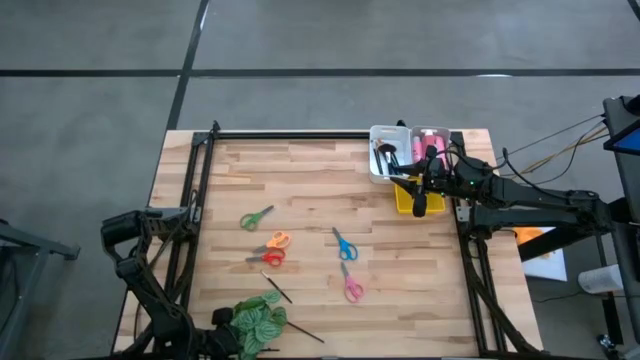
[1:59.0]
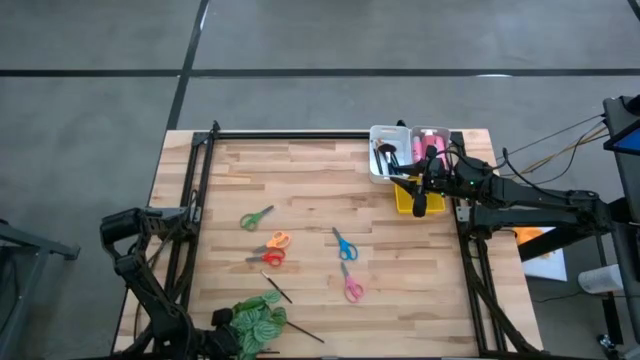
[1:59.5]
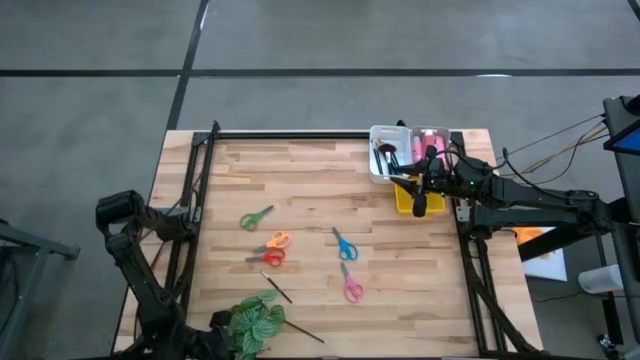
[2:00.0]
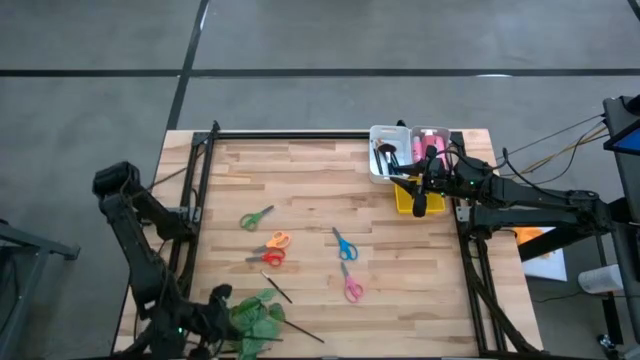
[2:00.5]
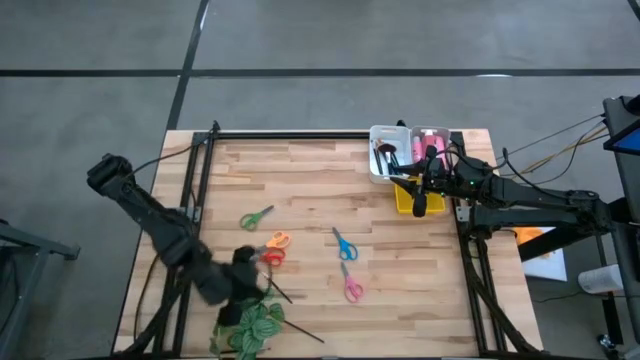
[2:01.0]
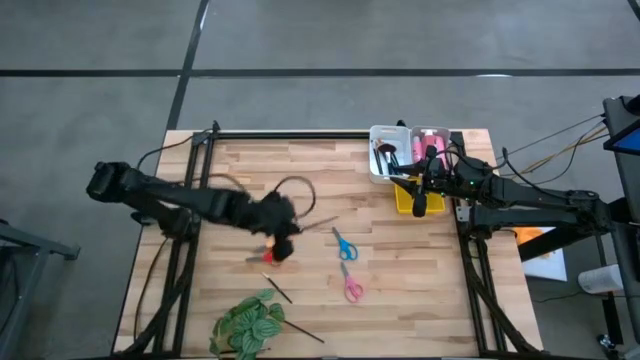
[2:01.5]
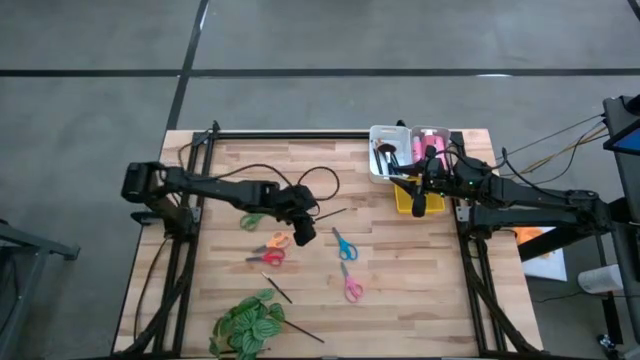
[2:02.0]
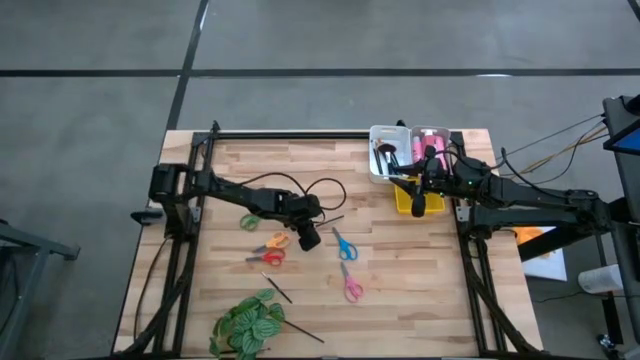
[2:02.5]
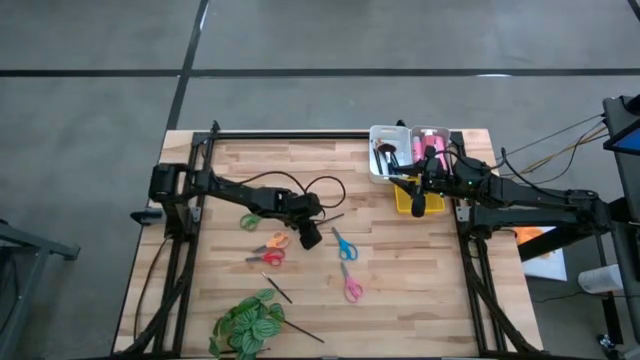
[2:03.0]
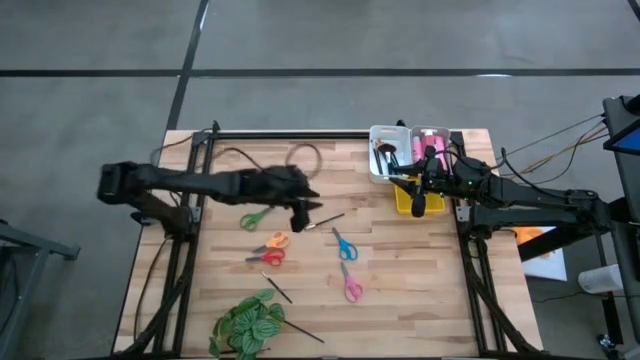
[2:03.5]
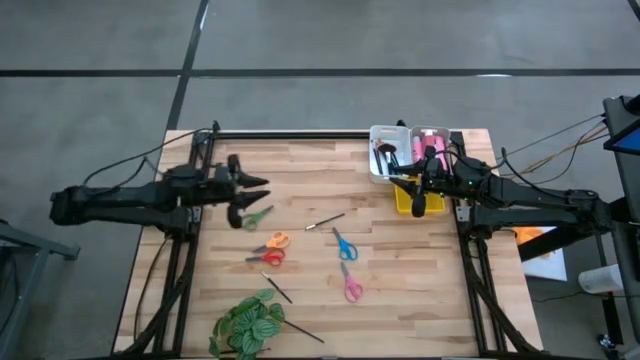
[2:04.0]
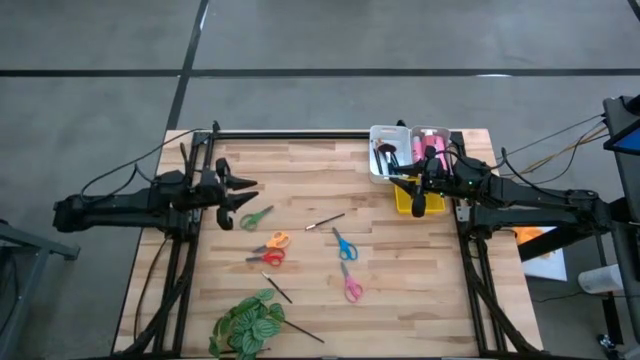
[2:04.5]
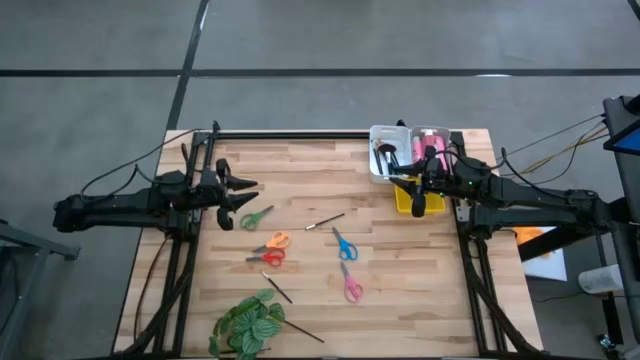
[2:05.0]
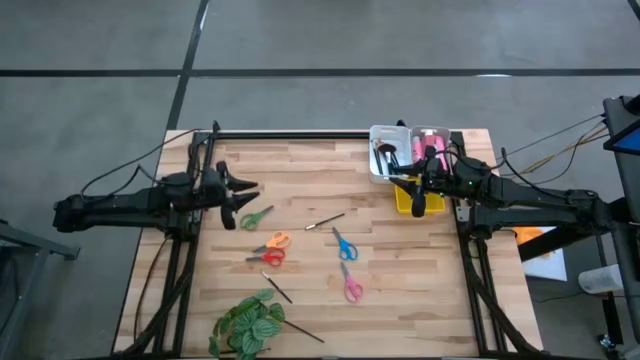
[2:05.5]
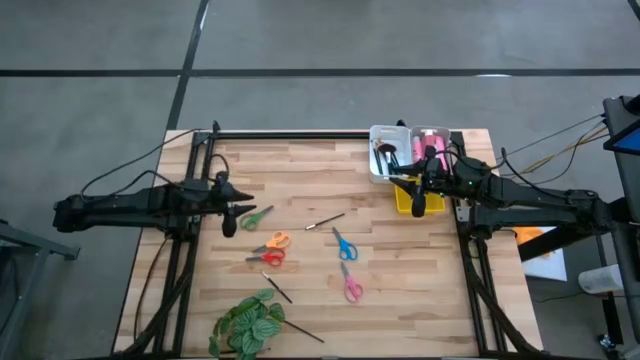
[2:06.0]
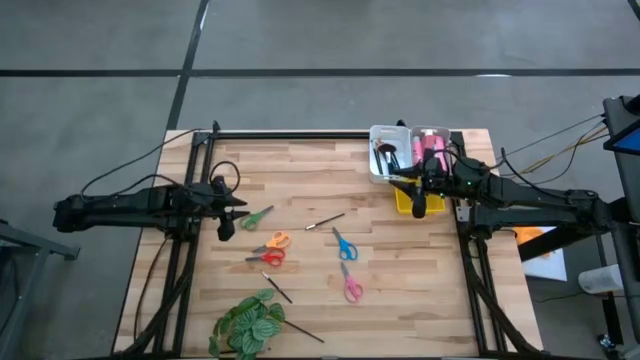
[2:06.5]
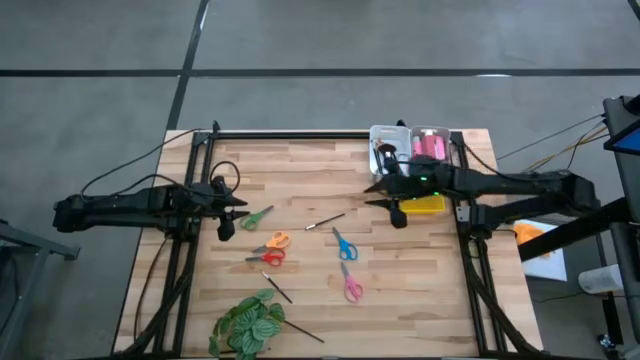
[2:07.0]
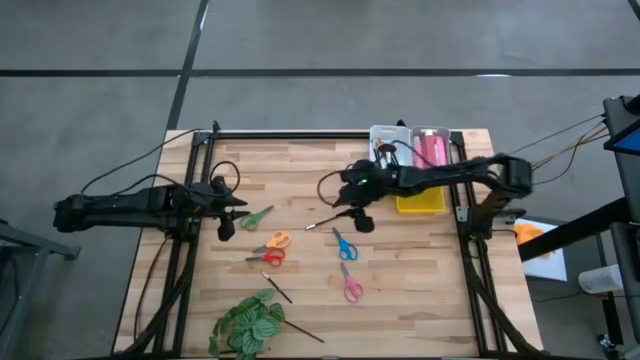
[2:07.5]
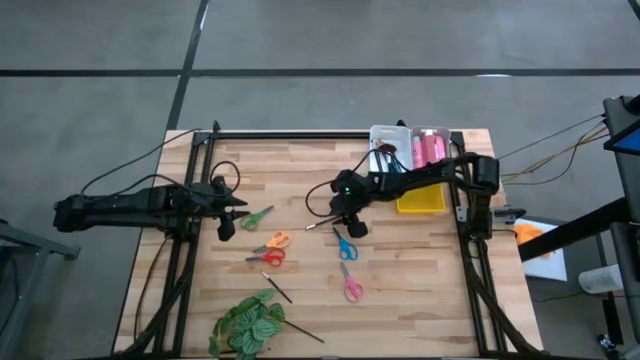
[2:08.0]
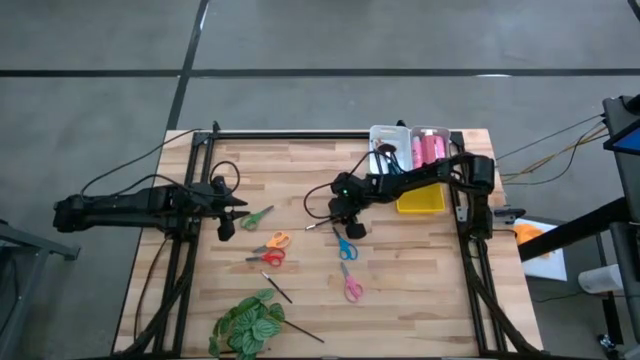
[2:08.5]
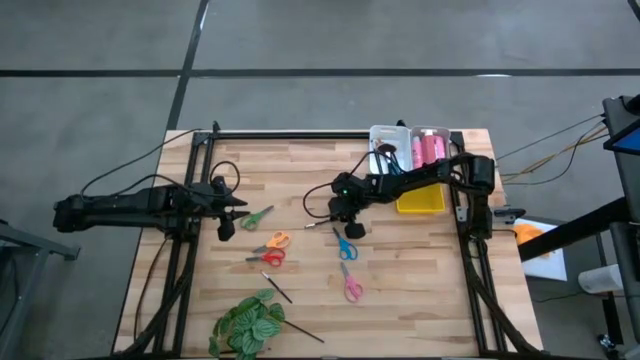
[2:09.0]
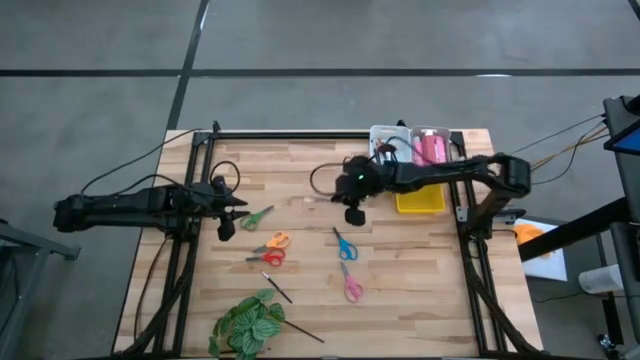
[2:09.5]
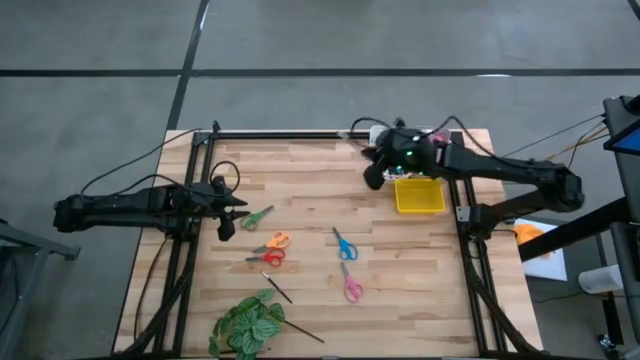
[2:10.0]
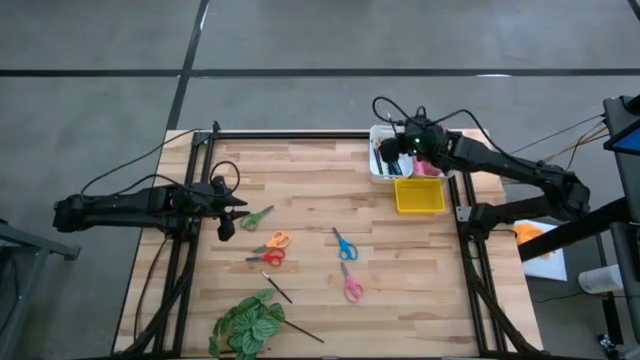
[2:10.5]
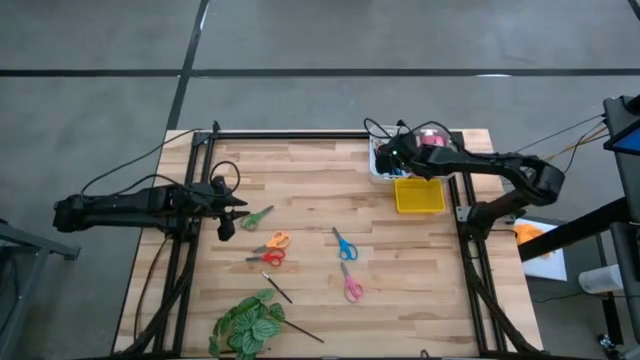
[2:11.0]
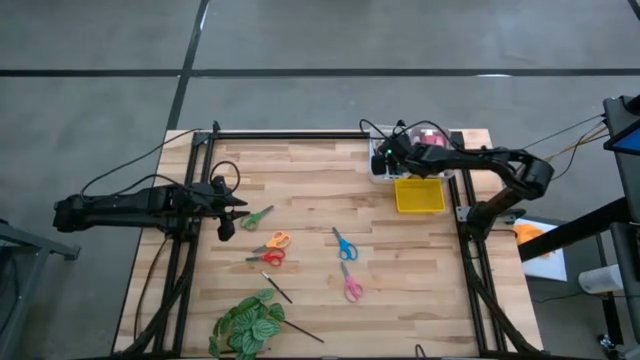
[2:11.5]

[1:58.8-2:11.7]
Task: Pick & Place Paint Supplies
Put the black paint brush into the white bin

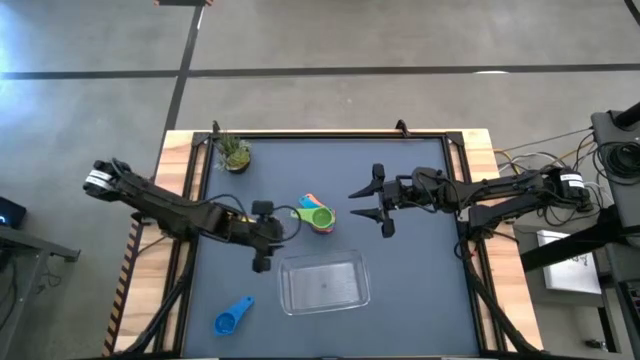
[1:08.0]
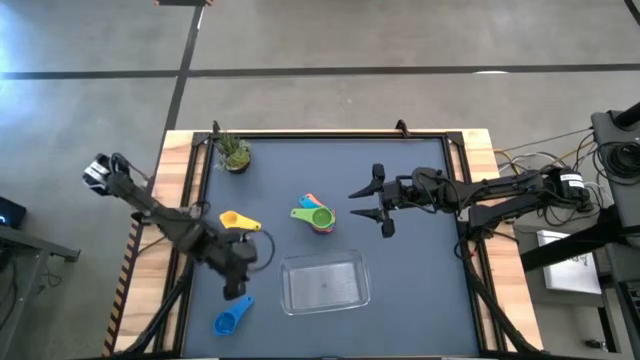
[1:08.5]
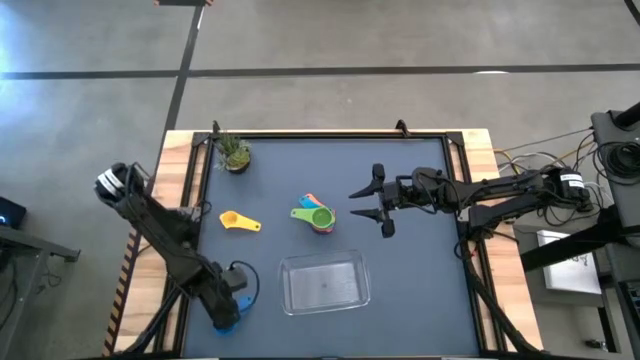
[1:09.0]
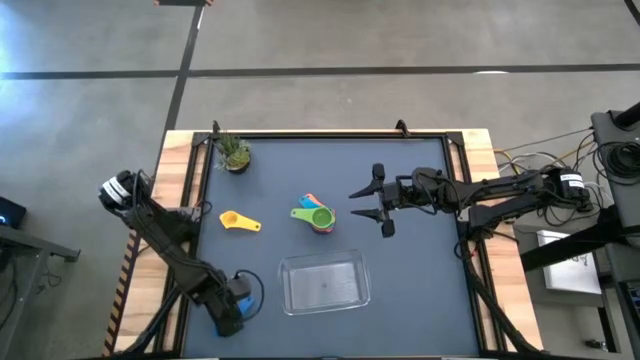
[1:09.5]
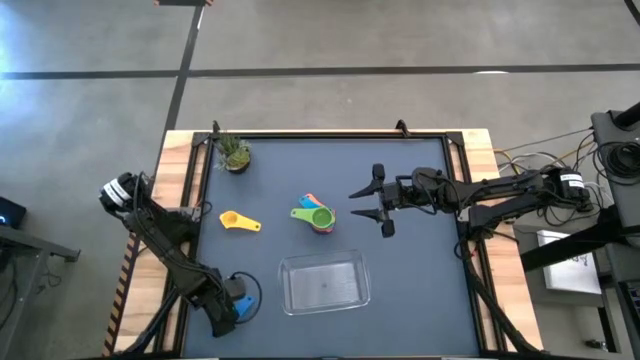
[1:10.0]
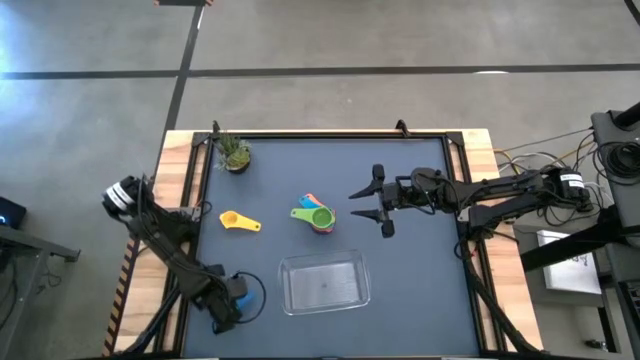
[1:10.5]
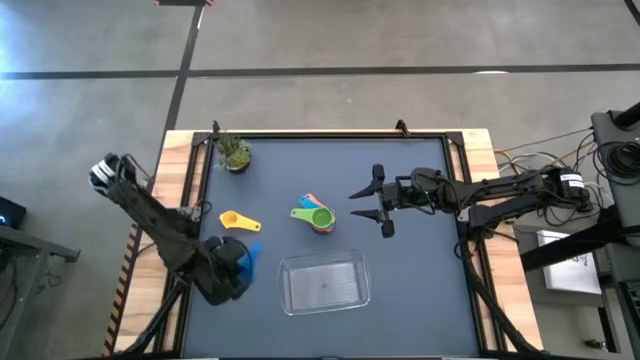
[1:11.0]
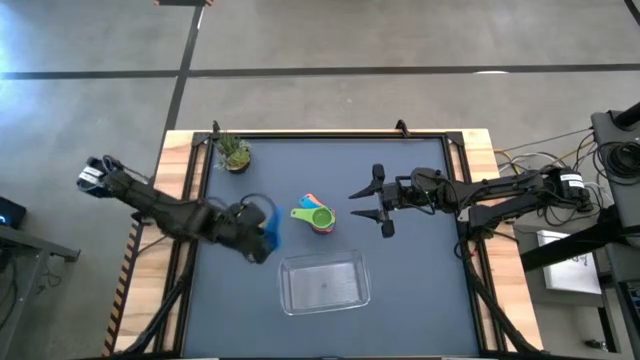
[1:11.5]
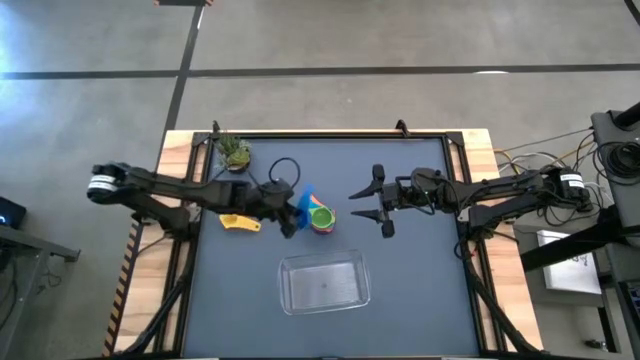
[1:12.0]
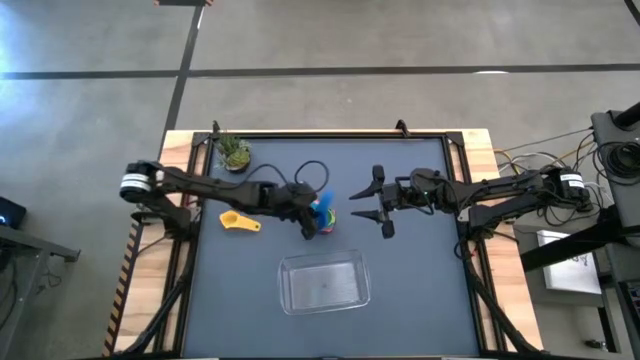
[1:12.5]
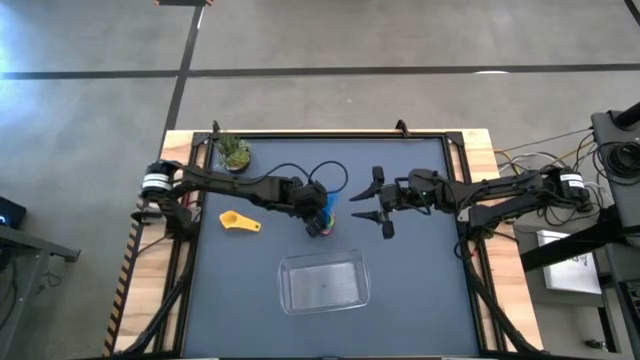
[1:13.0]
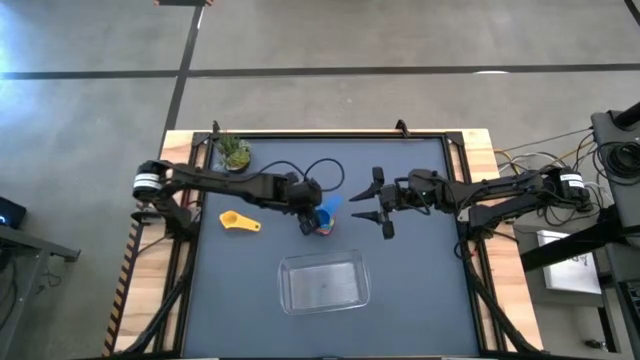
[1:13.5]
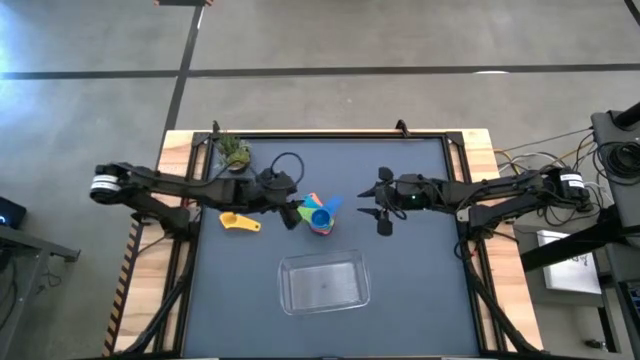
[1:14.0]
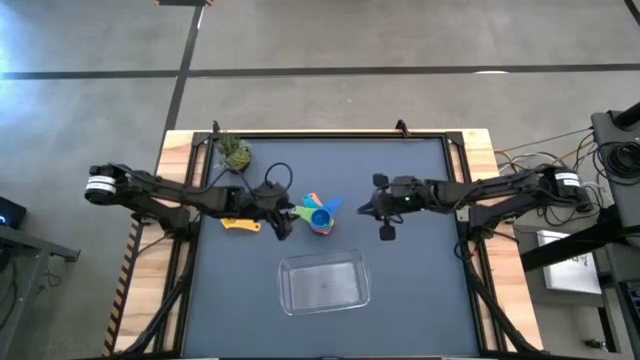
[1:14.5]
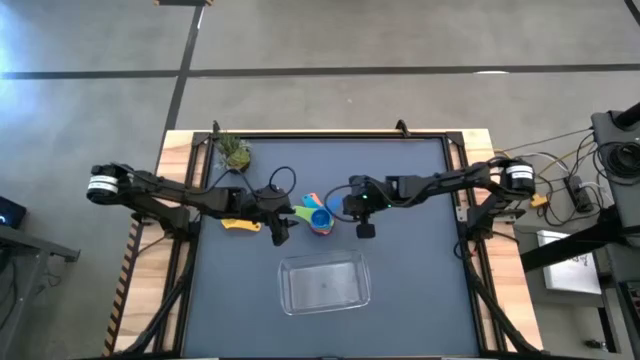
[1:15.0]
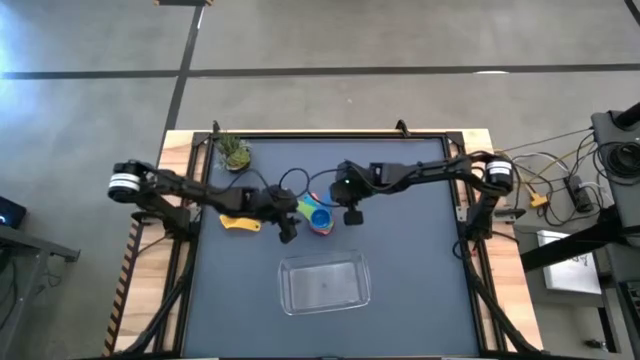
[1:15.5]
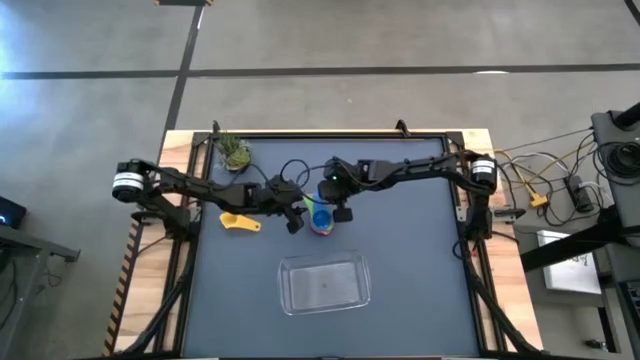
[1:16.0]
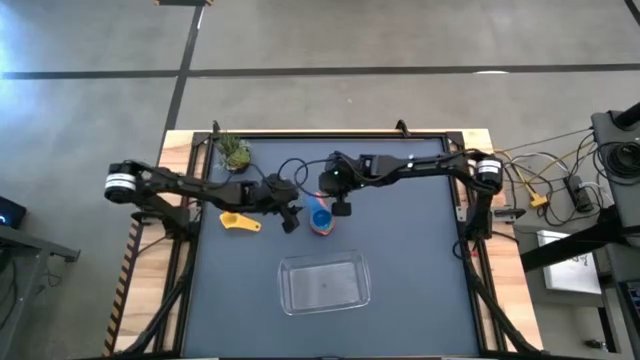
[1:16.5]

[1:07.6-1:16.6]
Task: Nest measuring cups in basket
Stack the blue measuring cup on top of the green measuring cup
